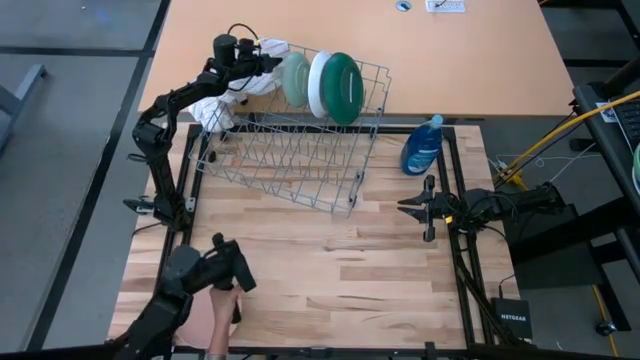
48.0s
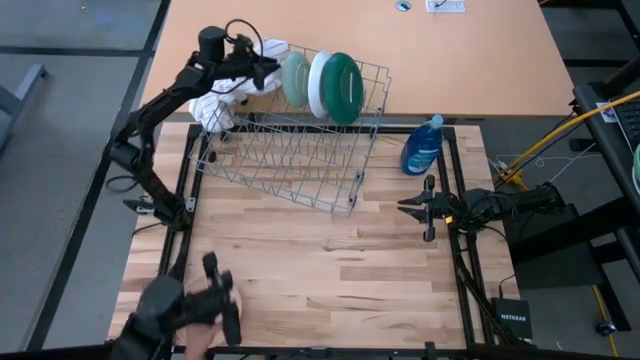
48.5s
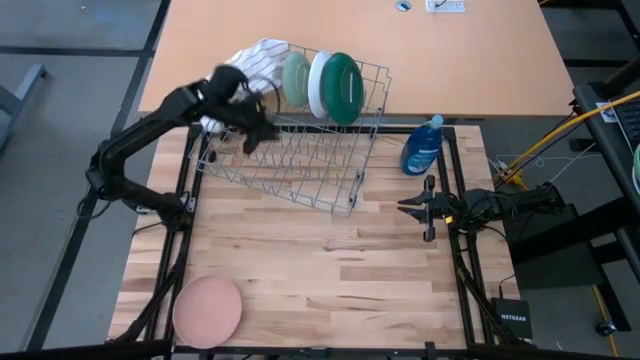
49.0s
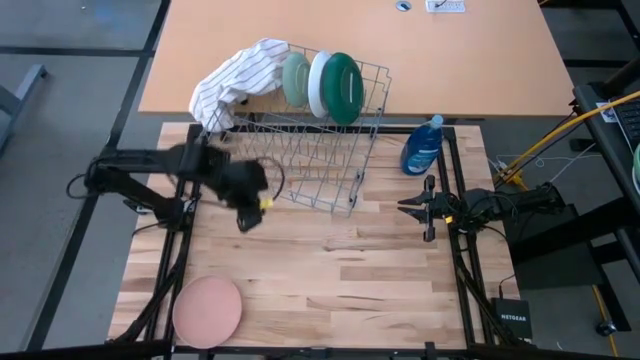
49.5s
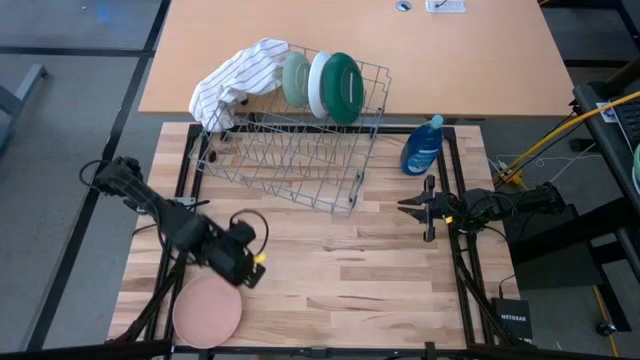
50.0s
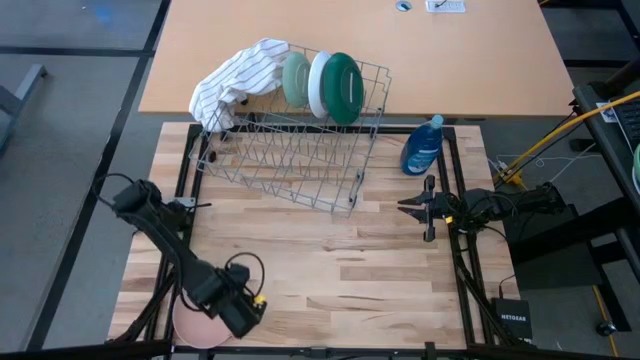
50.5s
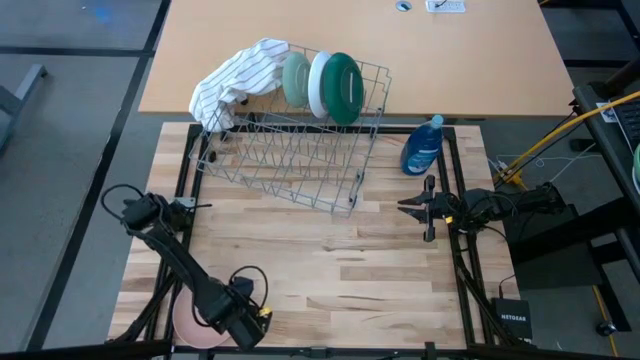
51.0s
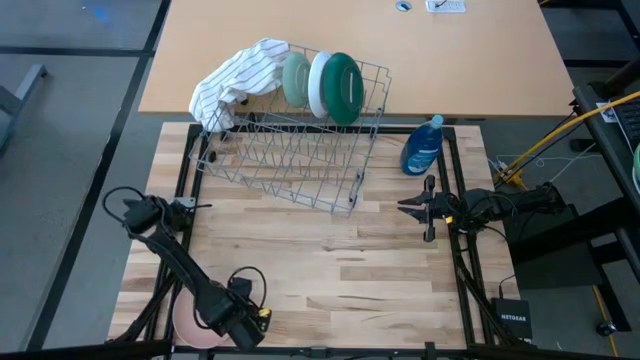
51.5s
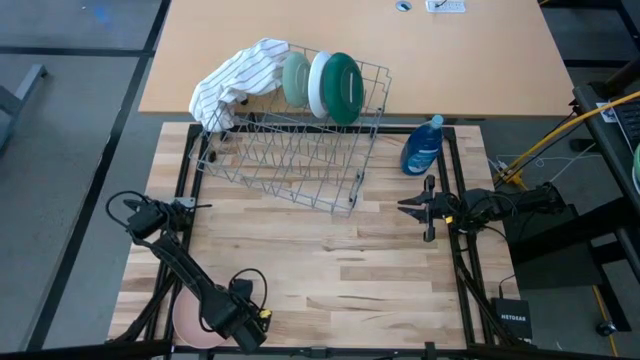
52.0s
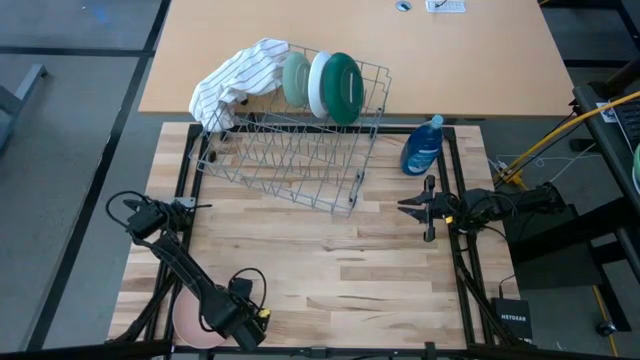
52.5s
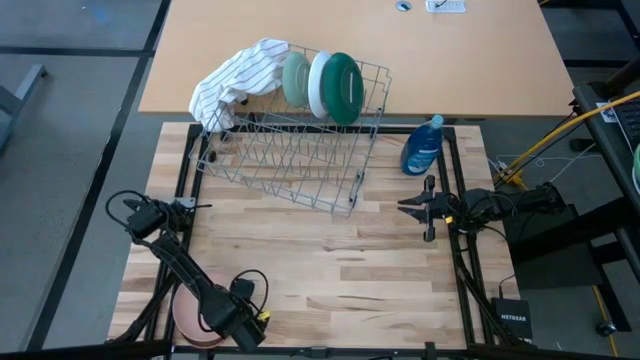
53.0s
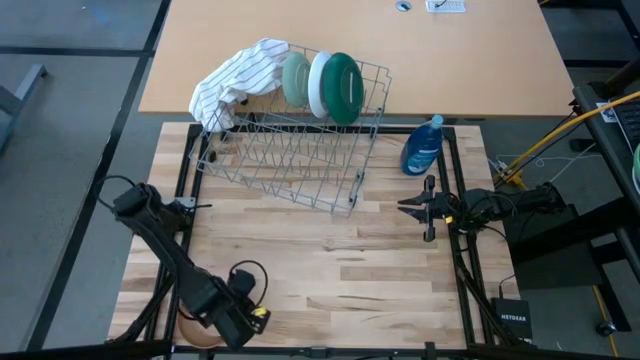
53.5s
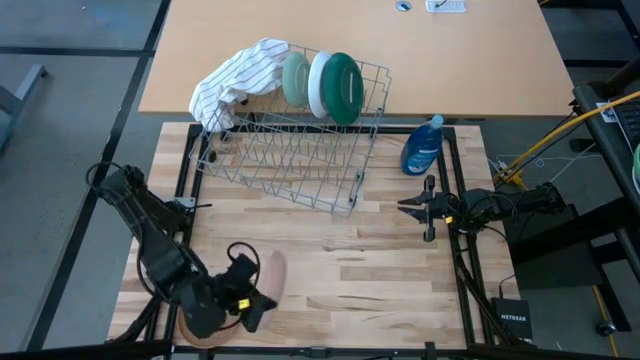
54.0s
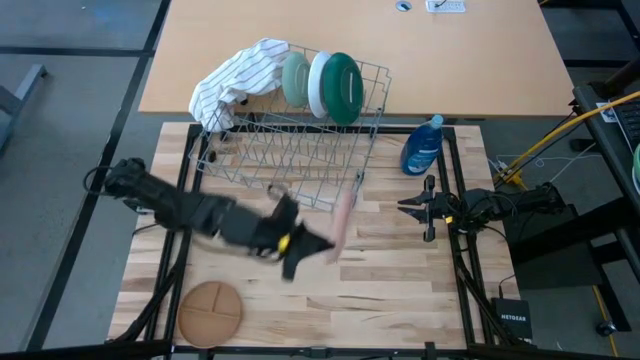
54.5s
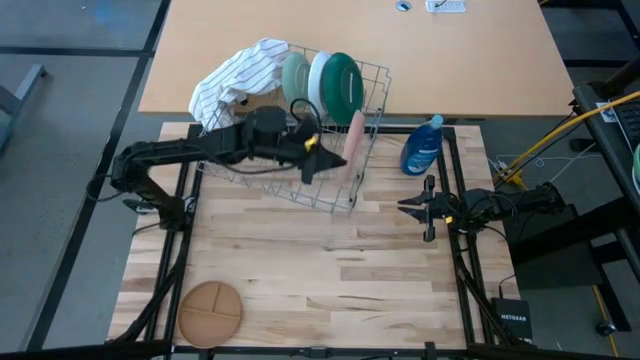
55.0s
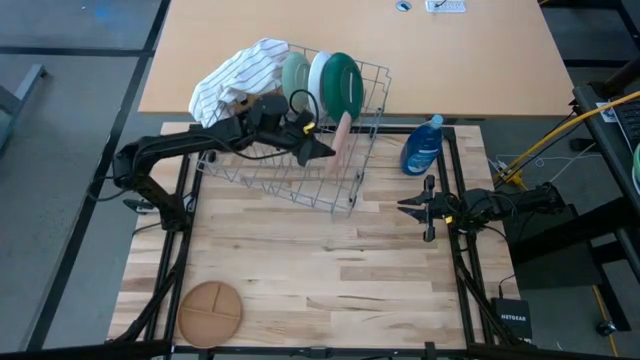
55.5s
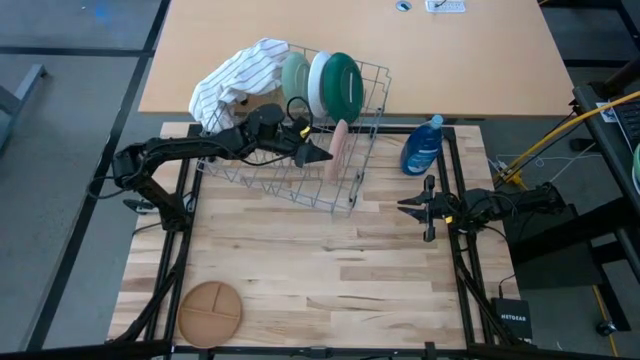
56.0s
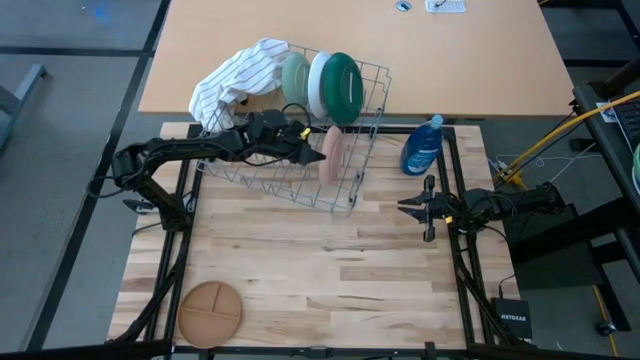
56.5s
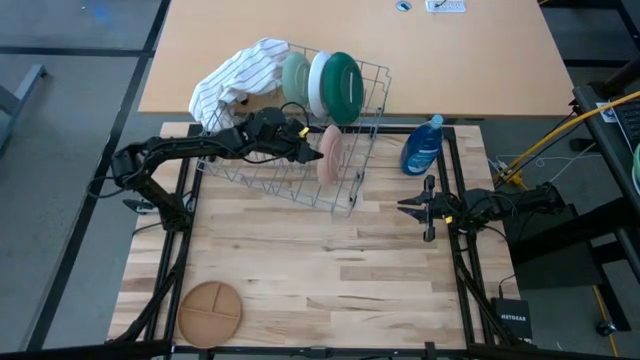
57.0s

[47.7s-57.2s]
Task: Sort dishes
Put the light pink plate into the dish rack

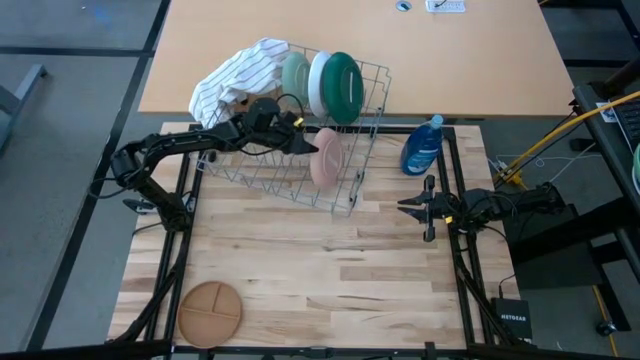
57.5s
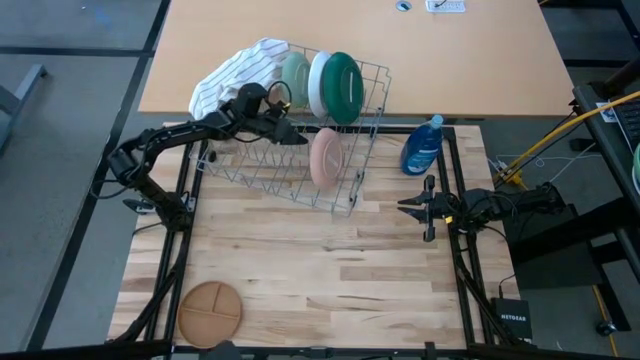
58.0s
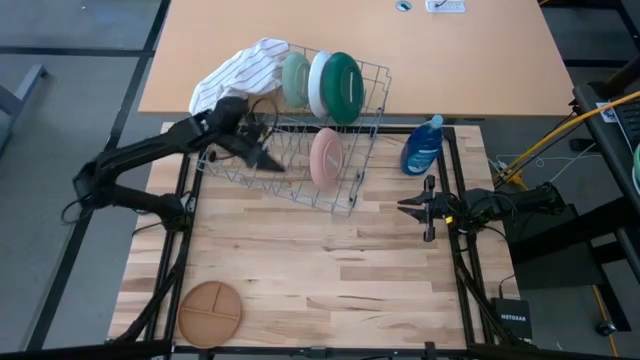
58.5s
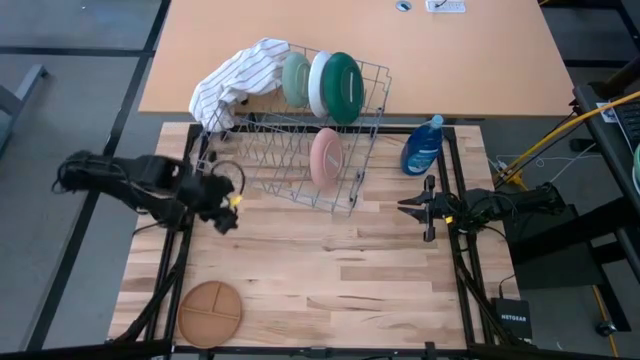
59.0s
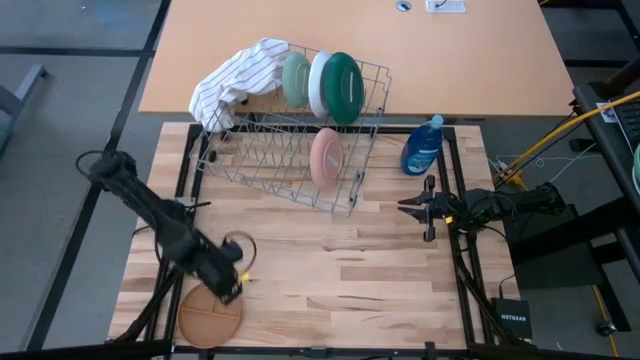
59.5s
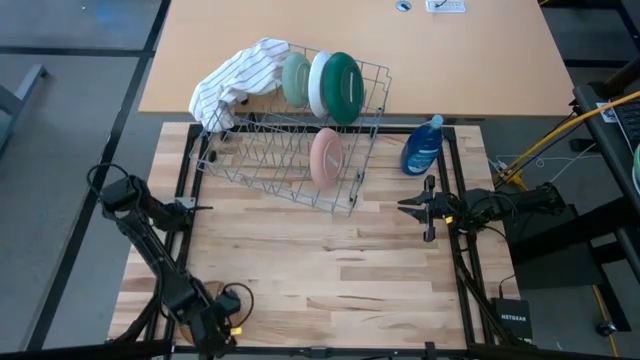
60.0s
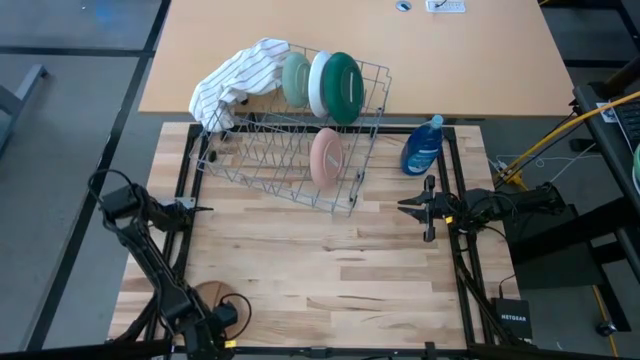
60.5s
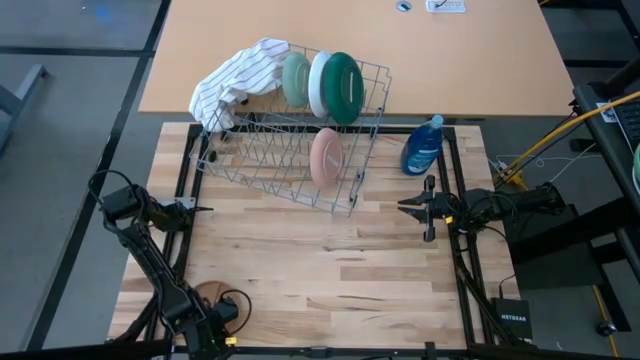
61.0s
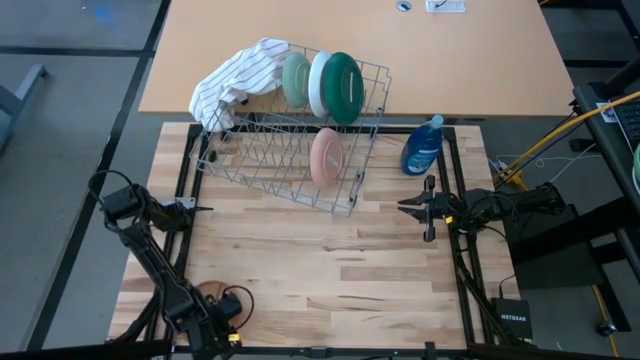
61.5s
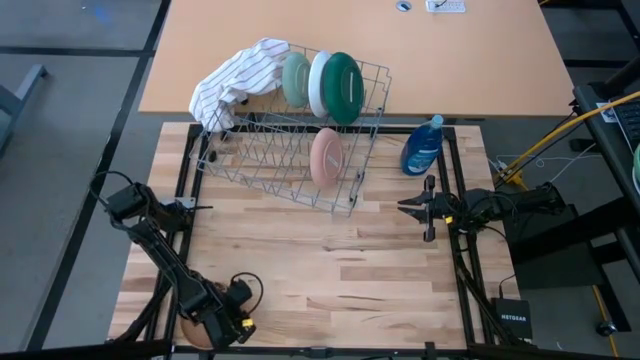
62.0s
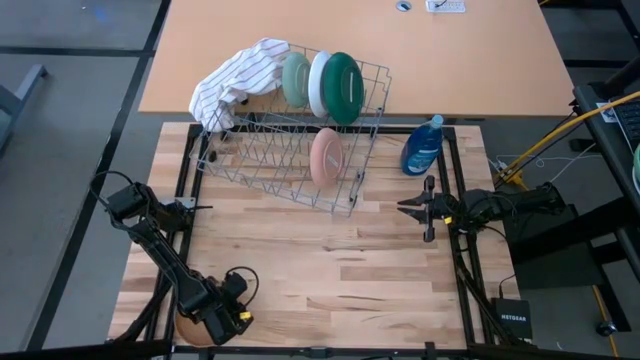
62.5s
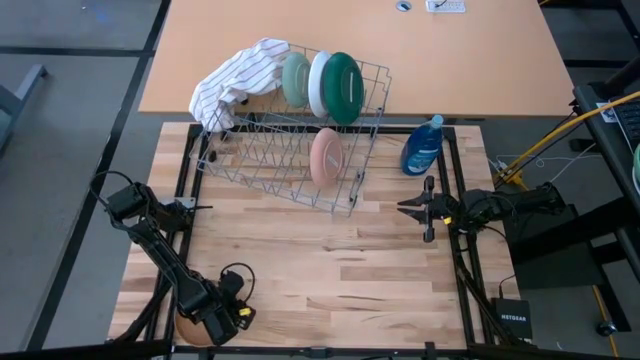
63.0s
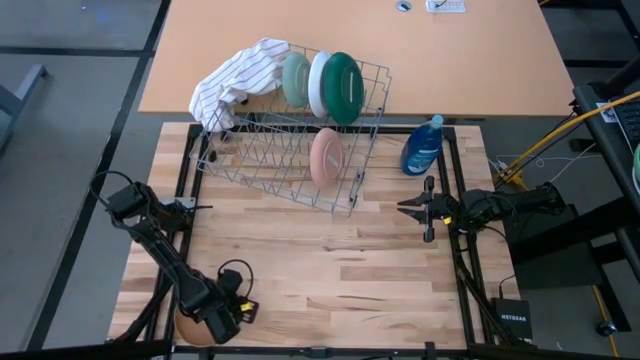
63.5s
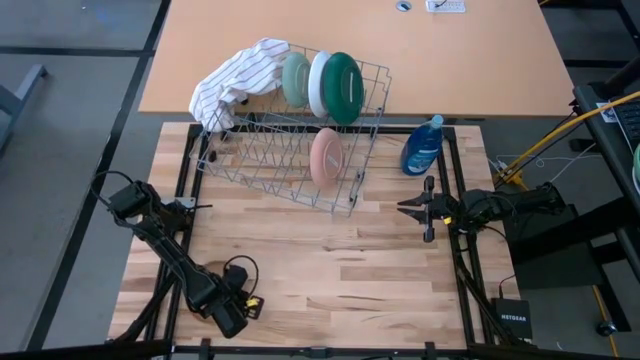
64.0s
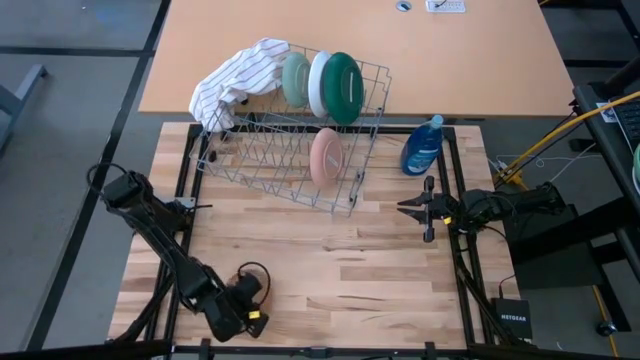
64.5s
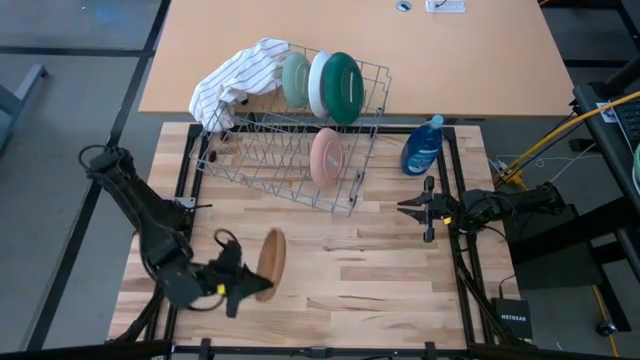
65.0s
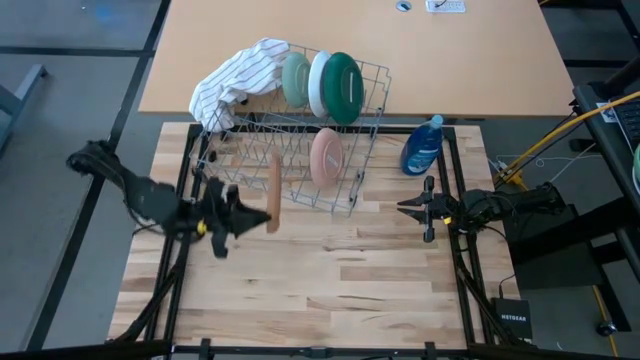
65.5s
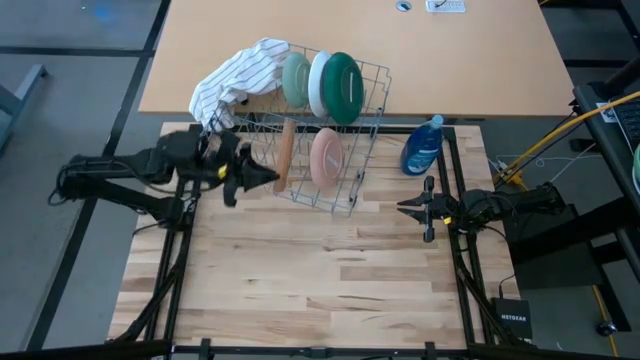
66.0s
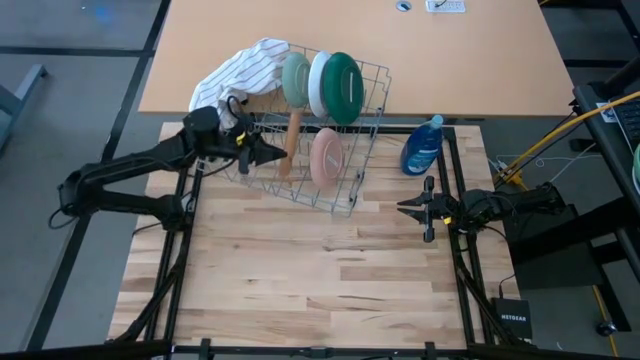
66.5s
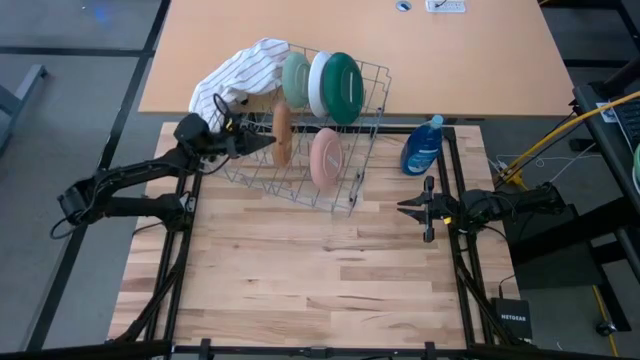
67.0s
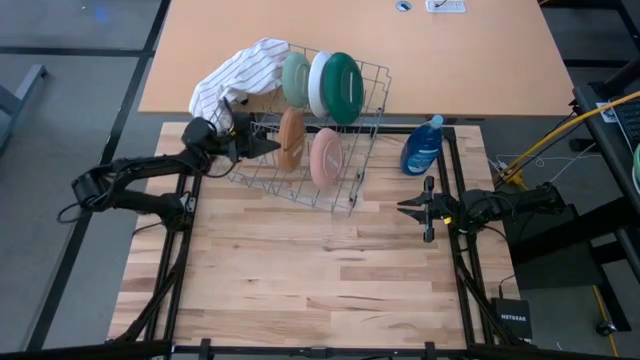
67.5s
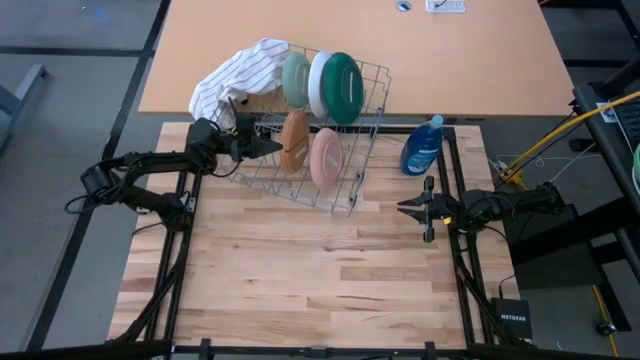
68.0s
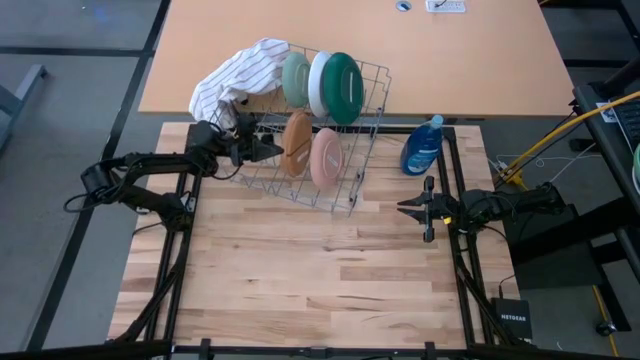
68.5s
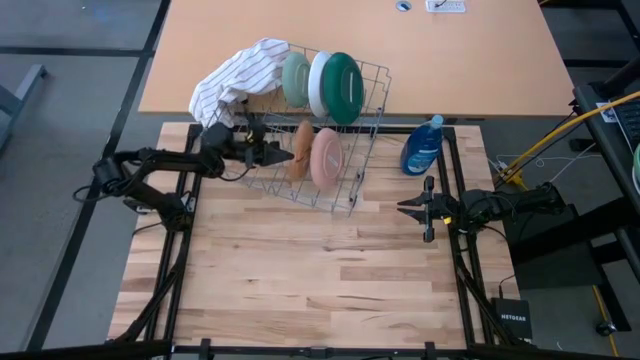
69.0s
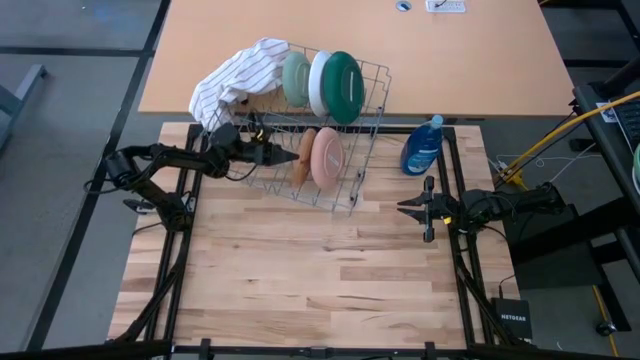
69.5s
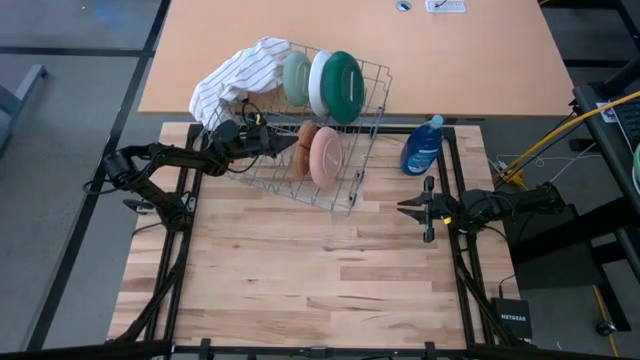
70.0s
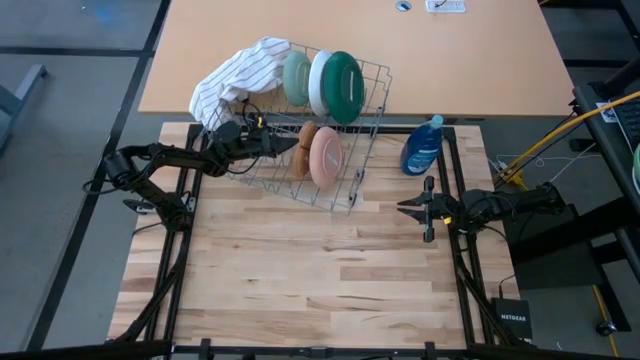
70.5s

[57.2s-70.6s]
Put the brown and yellow plate into the dish rack
